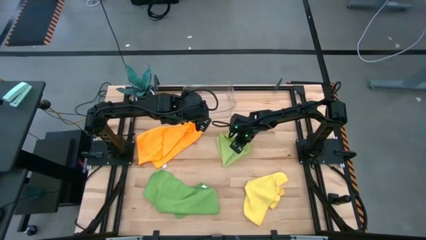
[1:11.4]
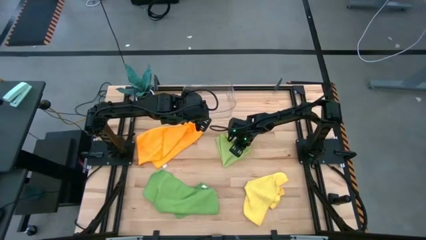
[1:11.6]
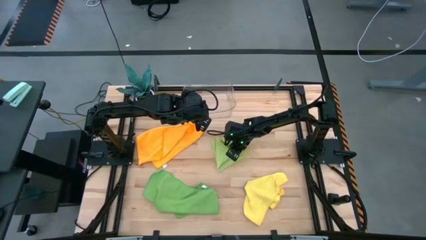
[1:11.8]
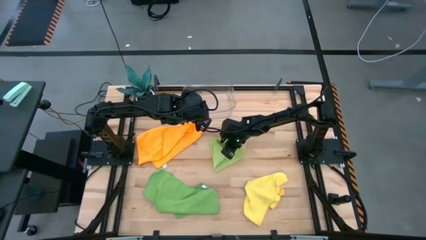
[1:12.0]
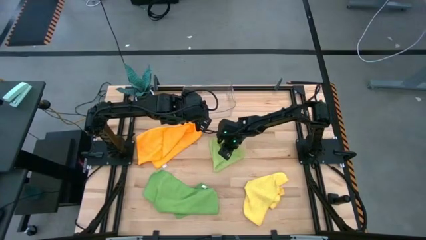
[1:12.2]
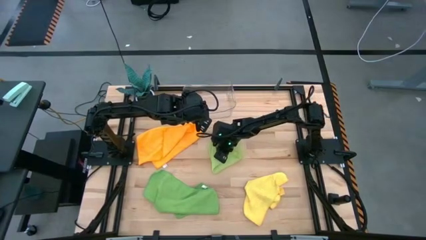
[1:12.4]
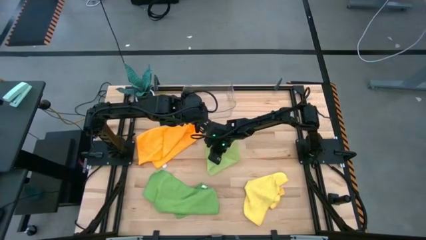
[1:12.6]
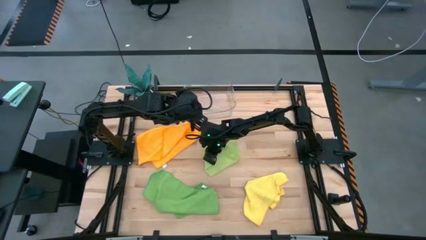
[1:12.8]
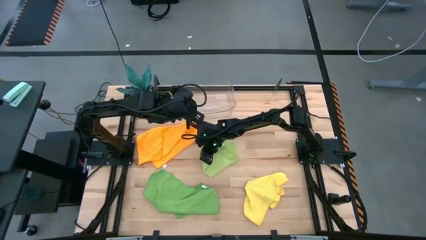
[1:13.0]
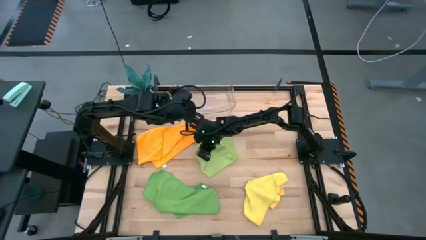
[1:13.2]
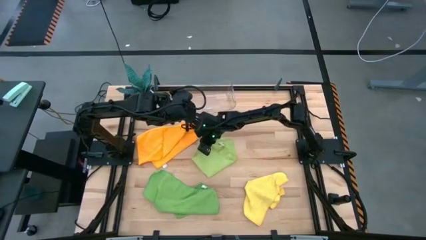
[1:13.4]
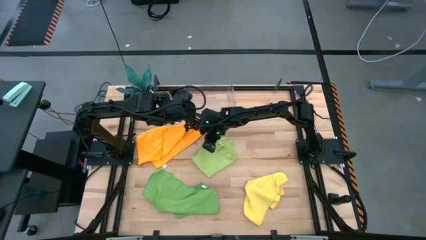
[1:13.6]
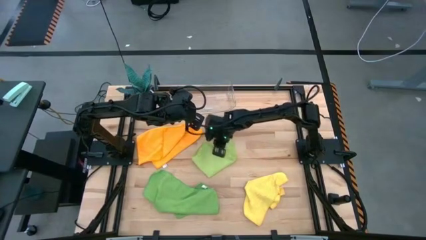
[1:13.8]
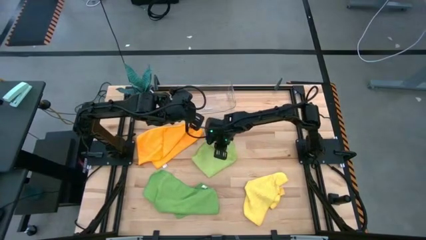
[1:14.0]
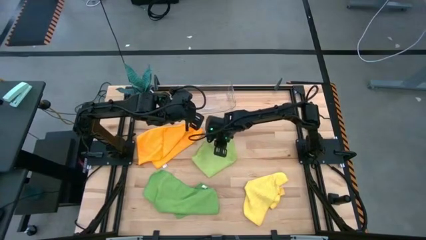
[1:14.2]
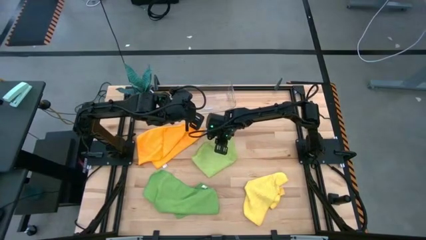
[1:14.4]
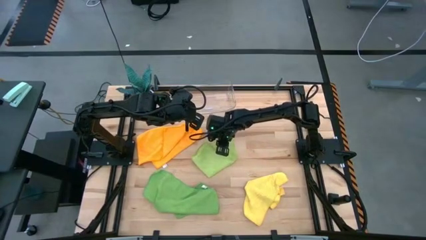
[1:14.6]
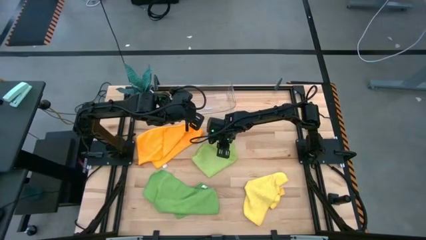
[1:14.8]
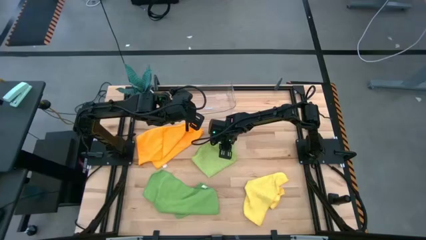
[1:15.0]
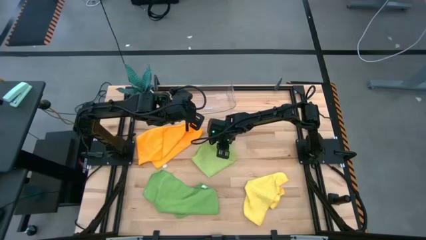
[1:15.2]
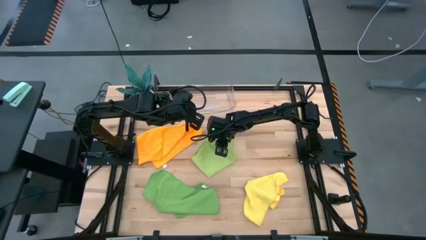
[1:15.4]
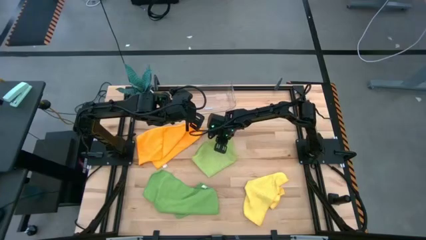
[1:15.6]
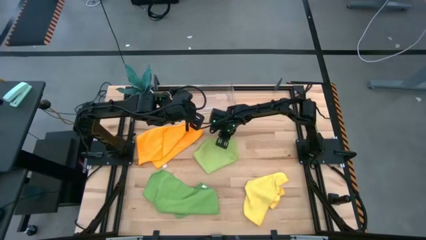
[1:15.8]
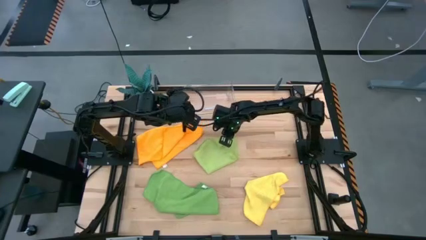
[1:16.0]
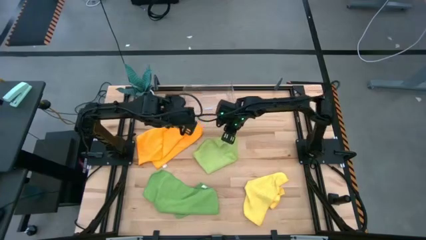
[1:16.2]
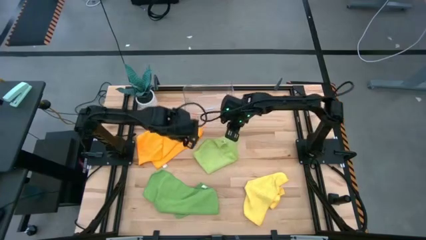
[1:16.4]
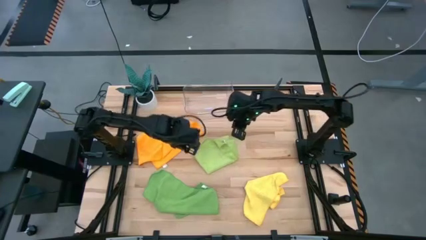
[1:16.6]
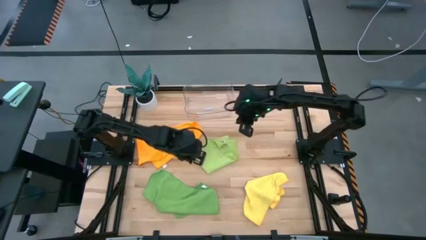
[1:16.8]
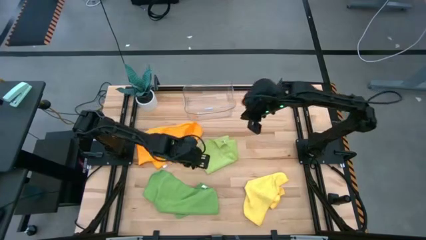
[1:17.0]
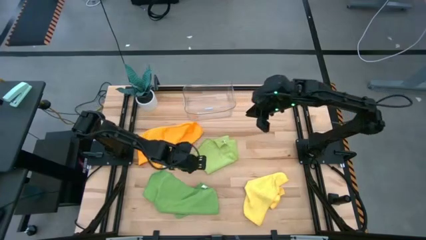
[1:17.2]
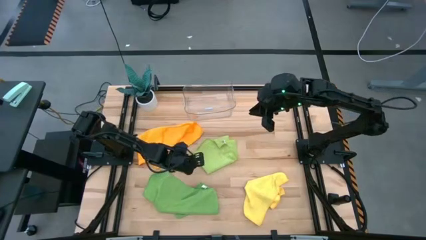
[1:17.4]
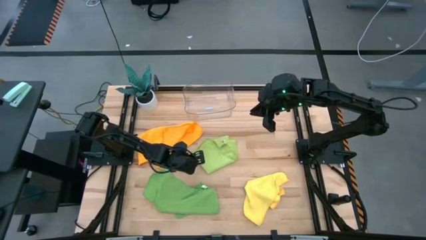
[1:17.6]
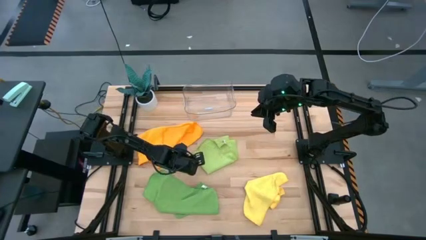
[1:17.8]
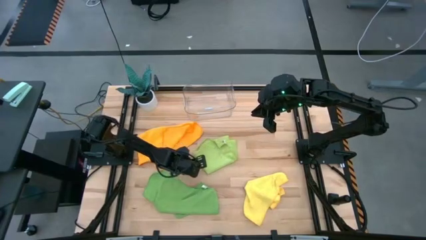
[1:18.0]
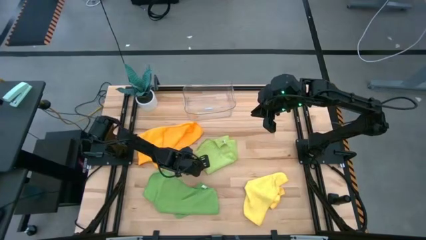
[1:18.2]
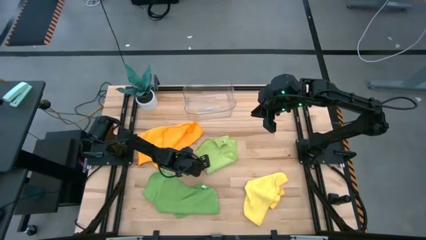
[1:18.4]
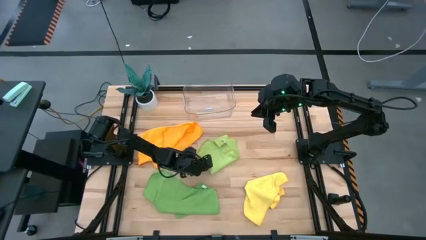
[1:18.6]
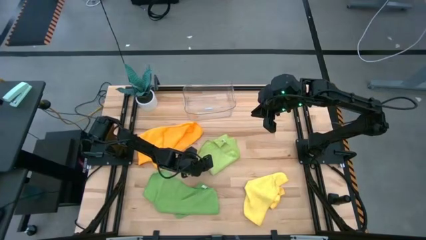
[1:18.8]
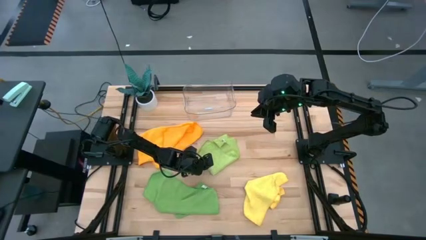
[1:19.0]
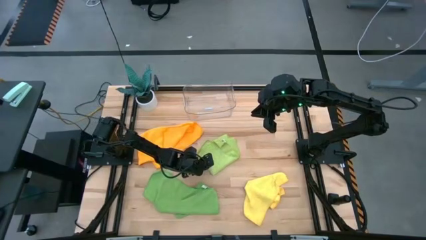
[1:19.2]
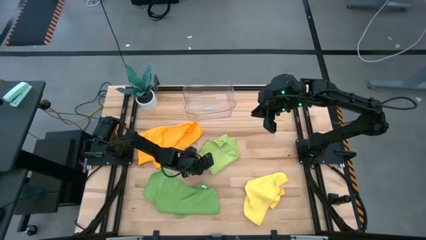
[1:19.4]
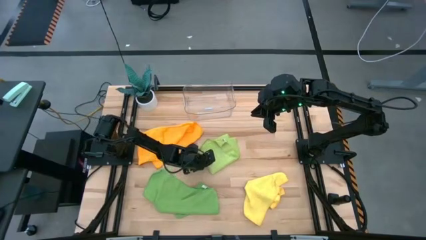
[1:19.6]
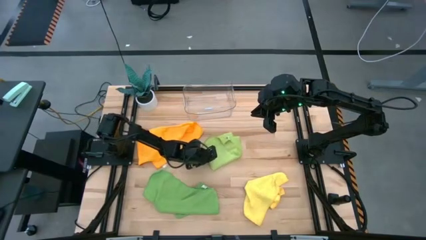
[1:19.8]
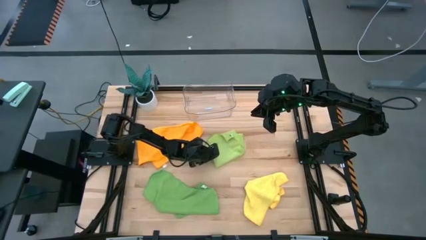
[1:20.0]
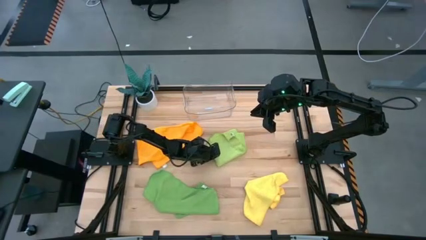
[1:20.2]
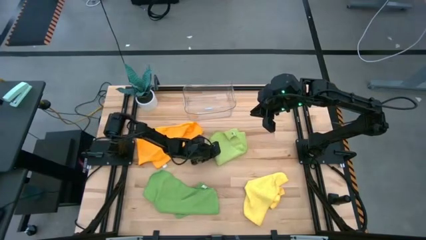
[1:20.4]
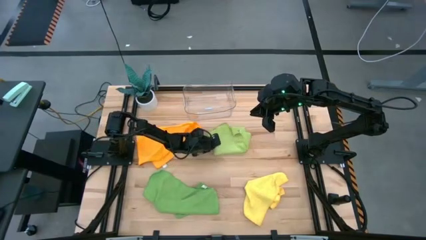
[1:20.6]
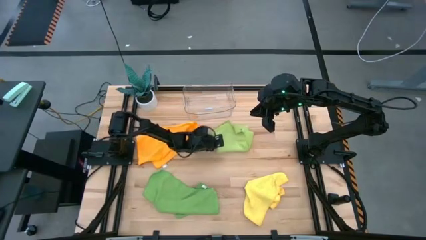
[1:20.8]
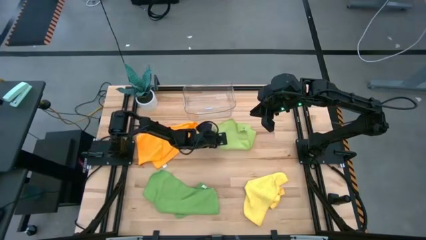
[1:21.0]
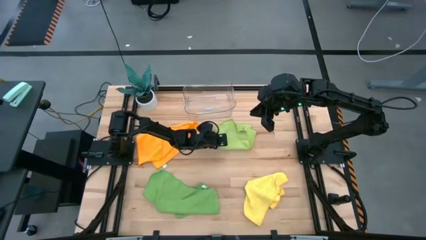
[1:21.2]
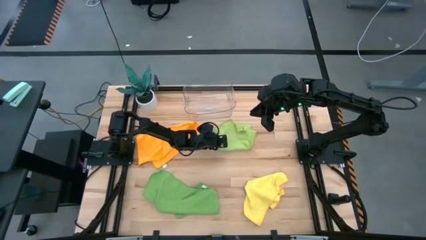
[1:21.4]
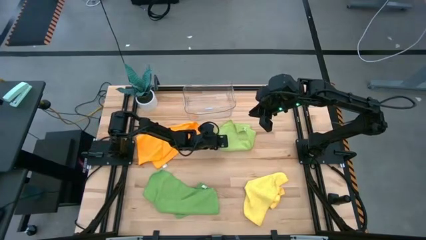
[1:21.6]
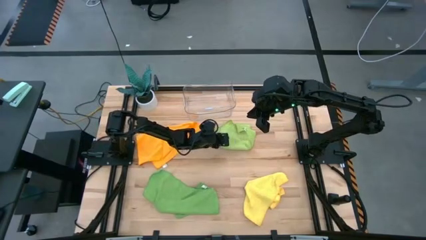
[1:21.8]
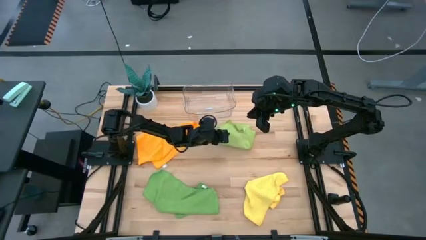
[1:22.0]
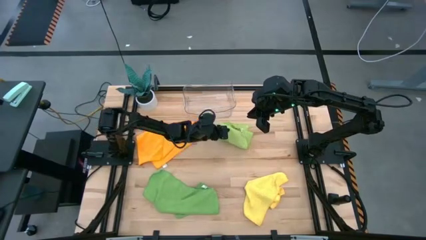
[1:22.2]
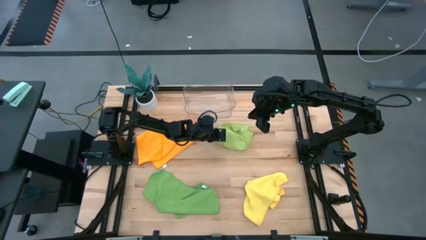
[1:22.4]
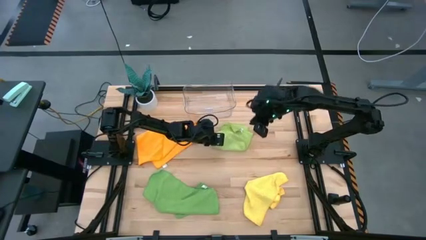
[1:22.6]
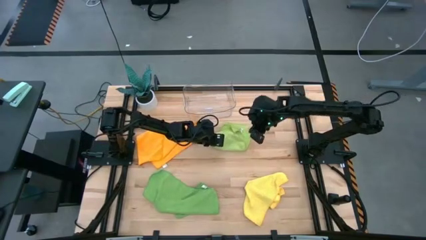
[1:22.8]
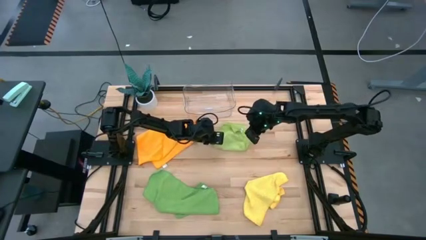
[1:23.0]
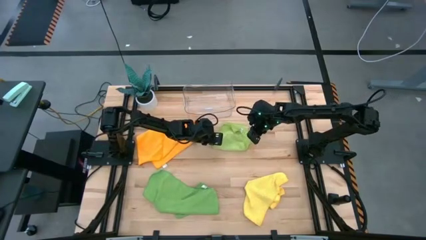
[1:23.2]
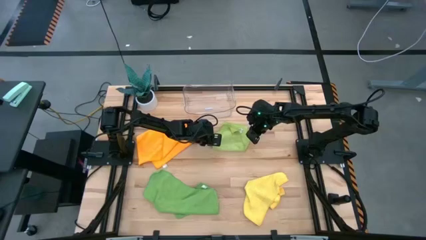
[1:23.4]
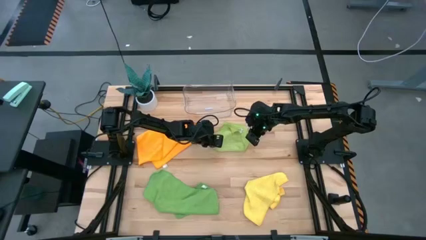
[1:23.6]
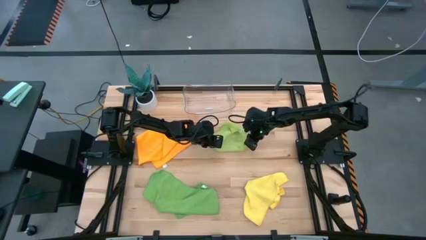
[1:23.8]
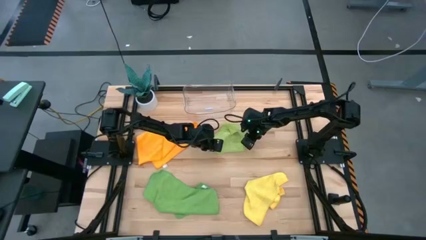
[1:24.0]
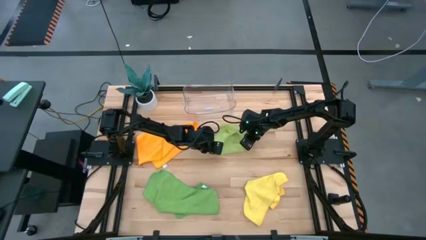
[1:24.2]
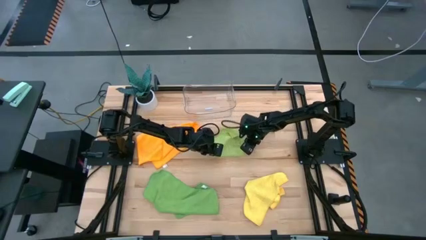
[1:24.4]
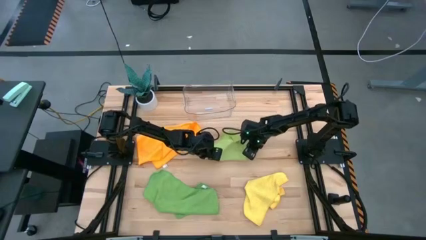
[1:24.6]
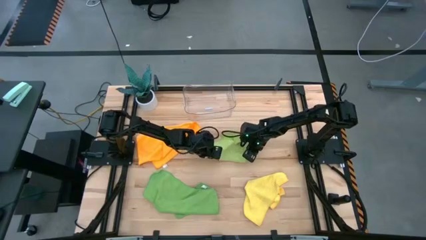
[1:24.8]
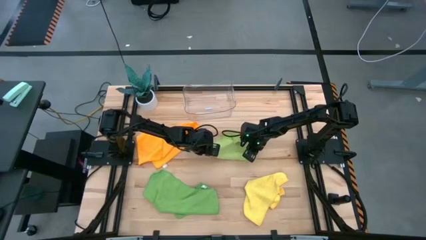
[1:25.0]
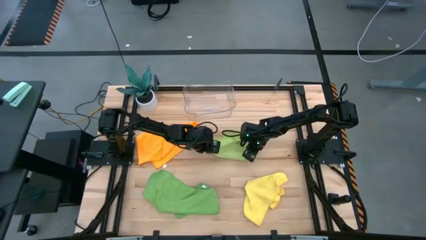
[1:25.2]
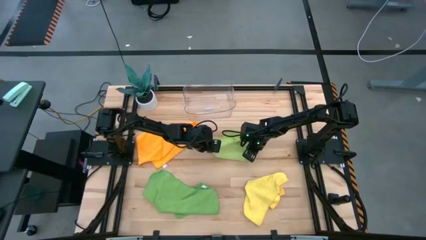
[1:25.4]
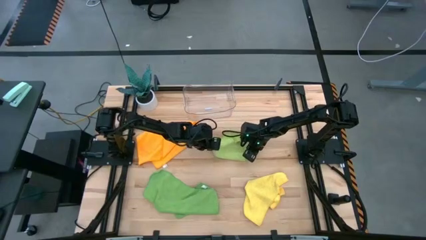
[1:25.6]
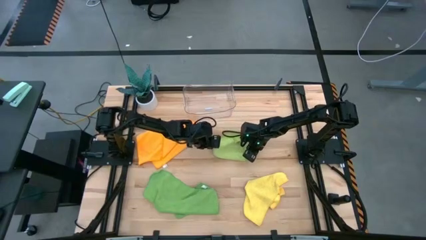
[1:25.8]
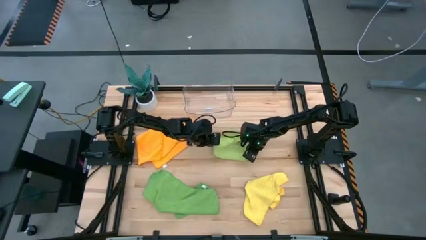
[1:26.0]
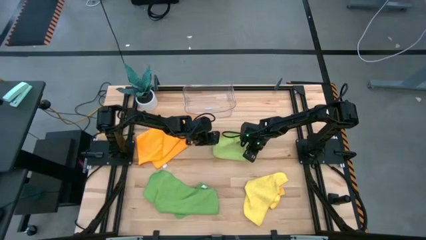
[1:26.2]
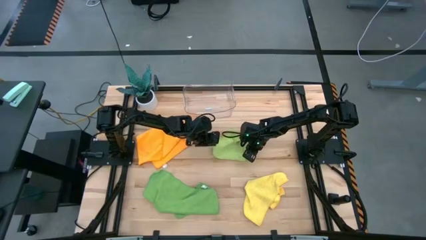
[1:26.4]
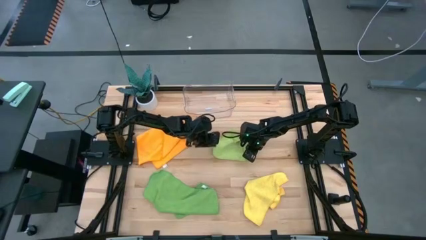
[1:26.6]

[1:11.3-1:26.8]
Task: Fold microfiber towels
Fold the light green microfiber cloth
